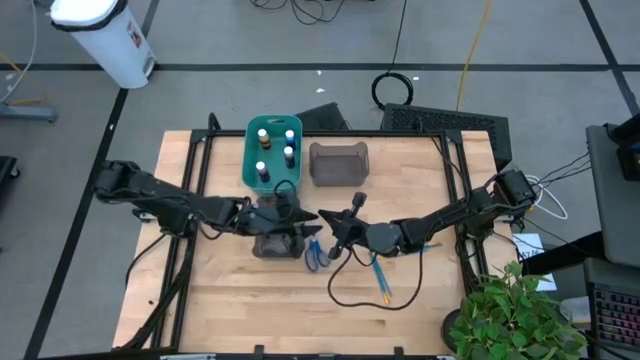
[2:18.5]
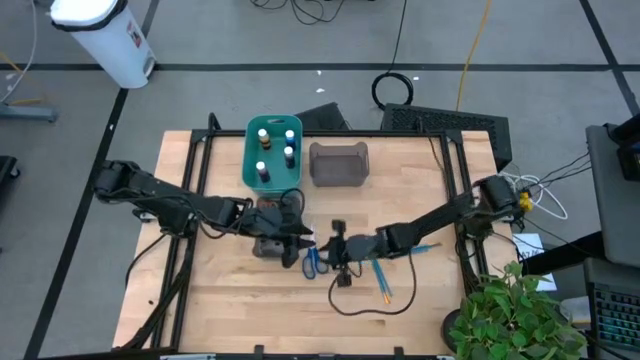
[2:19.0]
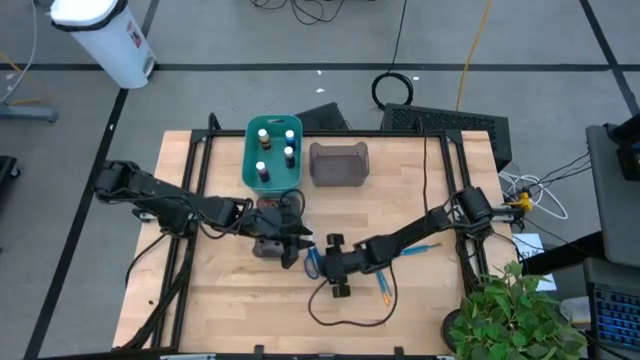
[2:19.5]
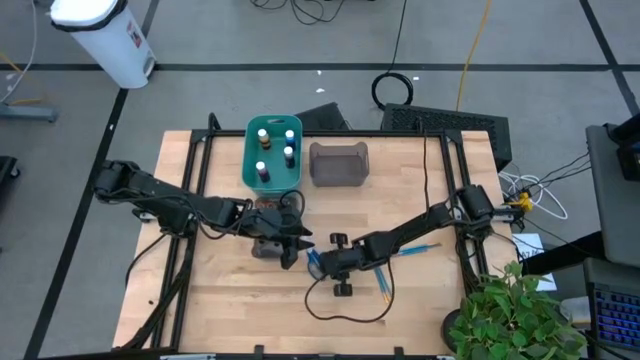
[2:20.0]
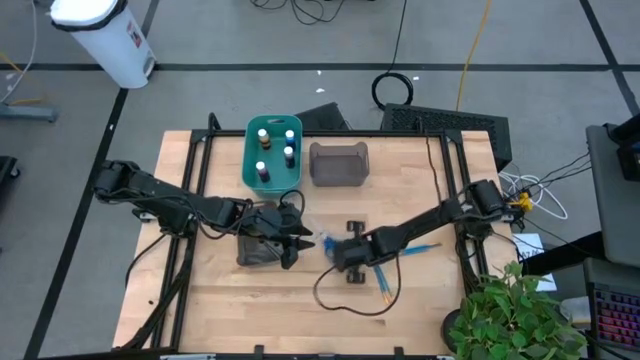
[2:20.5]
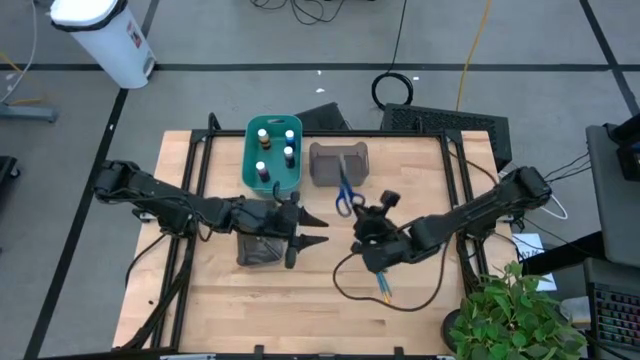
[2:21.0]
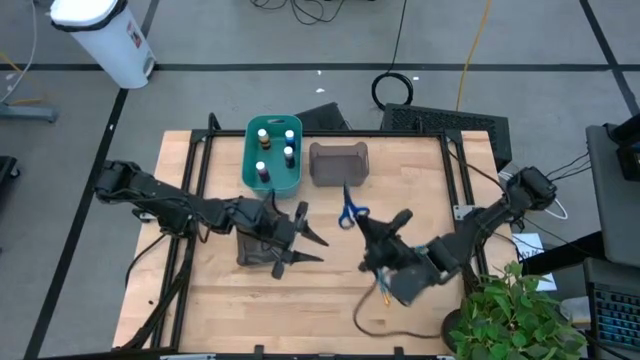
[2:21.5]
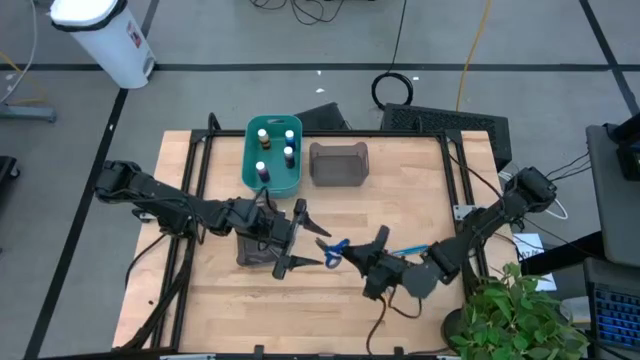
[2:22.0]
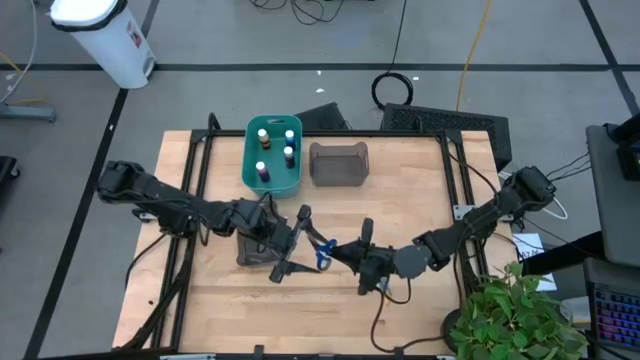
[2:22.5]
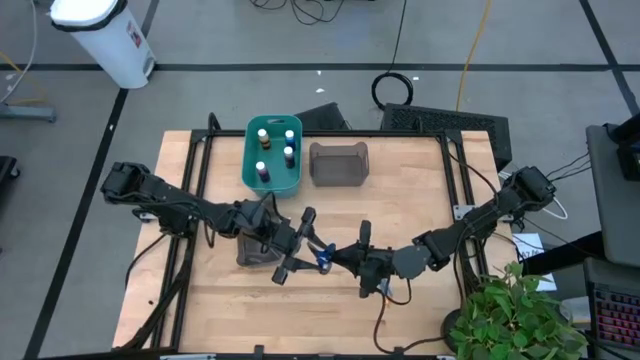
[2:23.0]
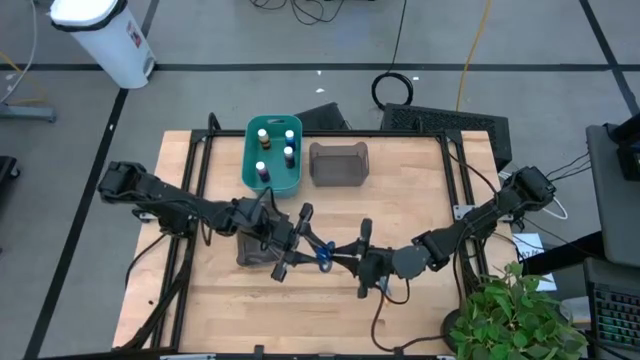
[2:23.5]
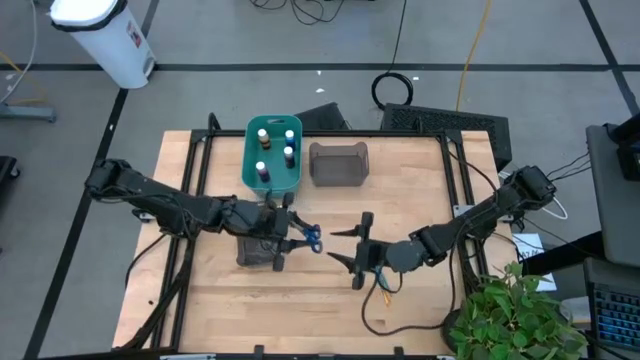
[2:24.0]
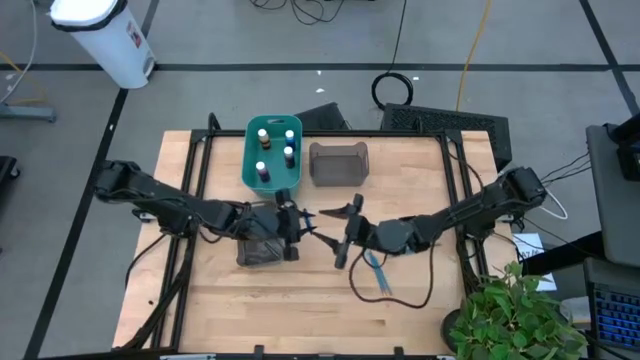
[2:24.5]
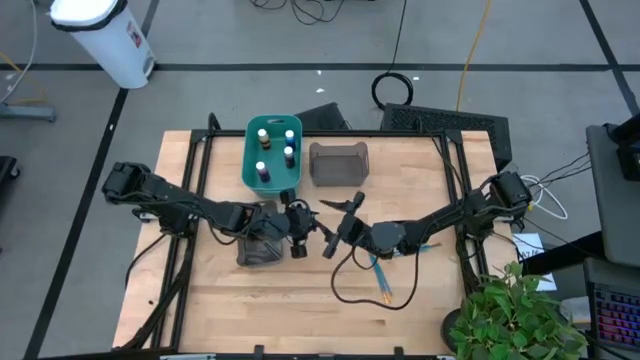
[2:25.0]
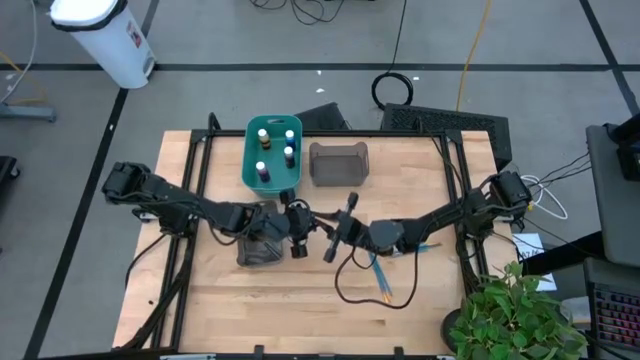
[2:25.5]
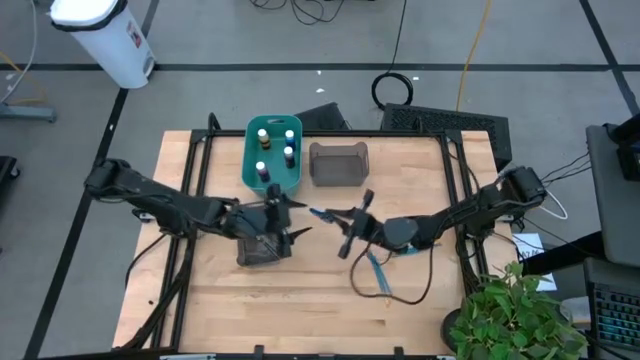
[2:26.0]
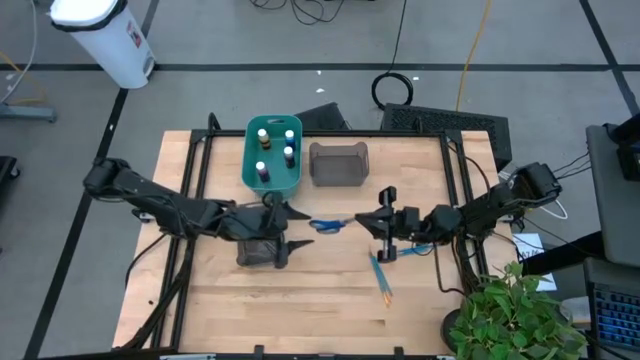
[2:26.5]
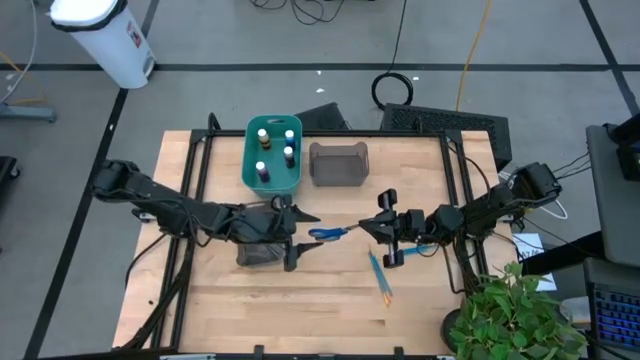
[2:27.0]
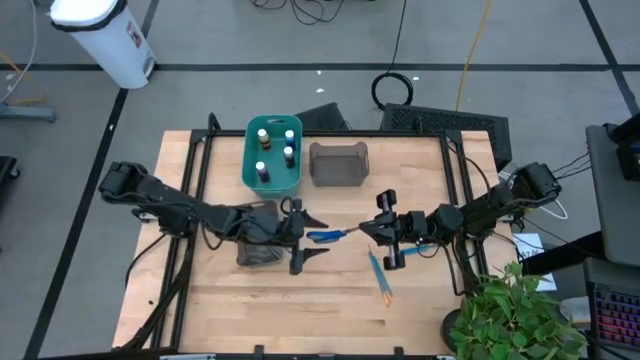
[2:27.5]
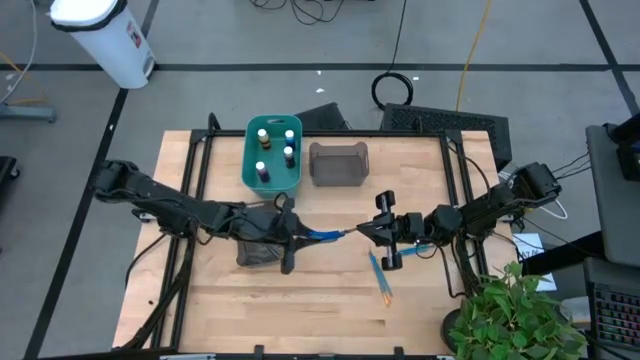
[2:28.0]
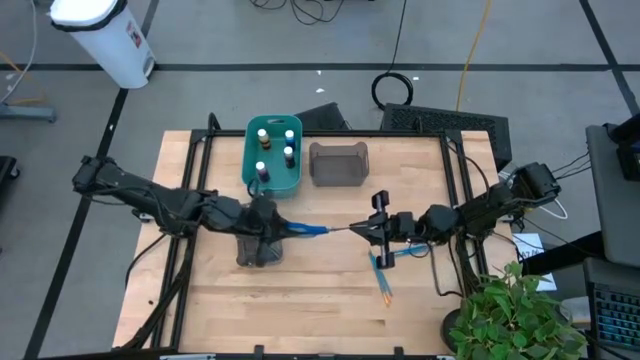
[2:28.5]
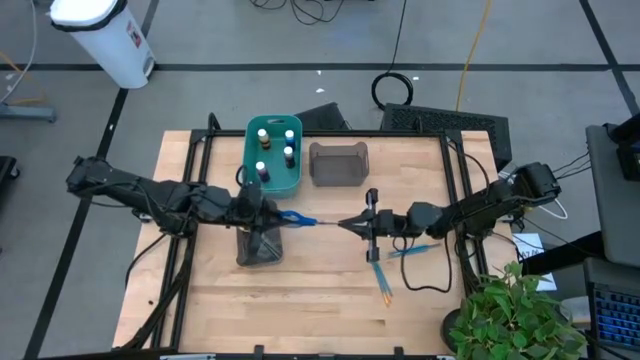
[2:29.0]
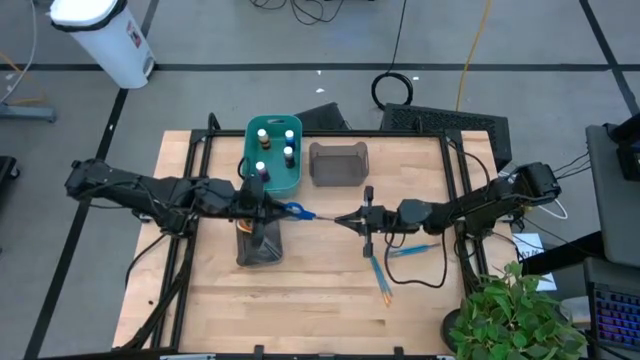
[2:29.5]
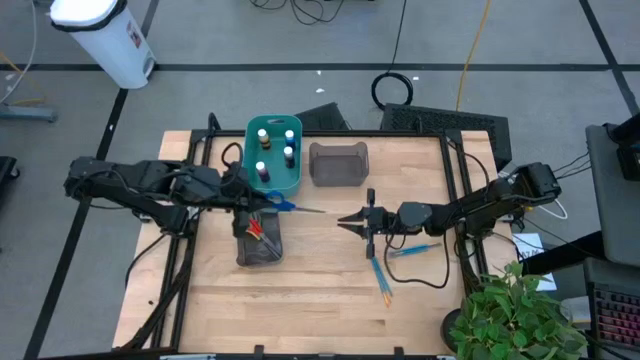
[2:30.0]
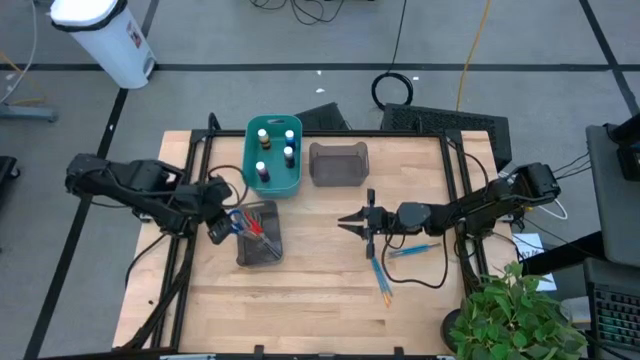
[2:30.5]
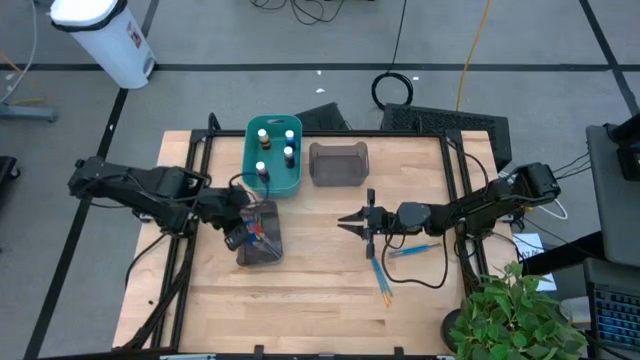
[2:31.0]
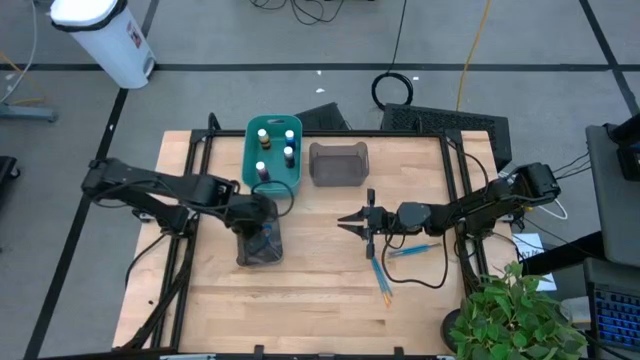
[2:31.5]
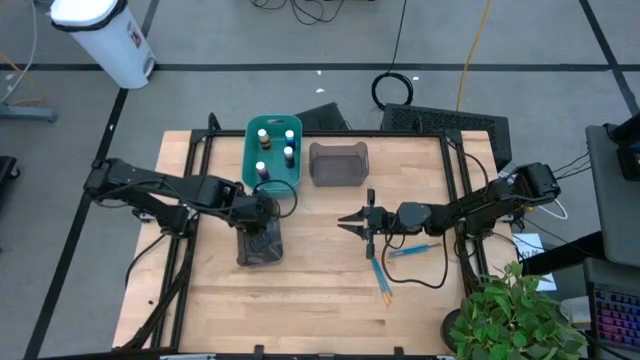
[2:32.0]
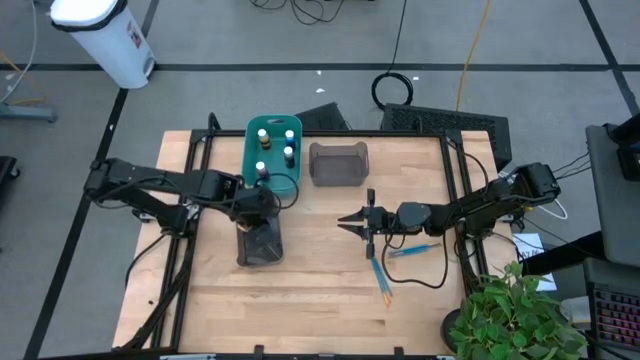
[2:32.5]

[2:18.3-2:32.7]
Task: Pick & Place Paint Supplies
Put the blue scissors into the bottom black bin

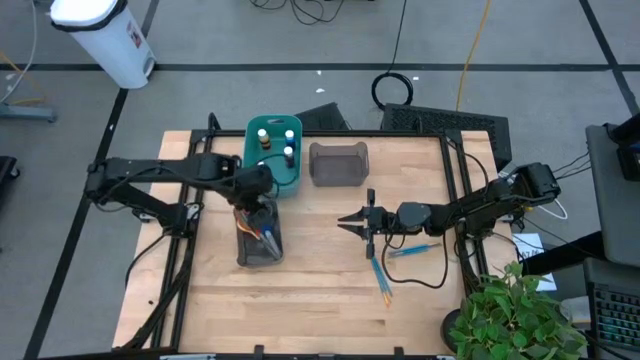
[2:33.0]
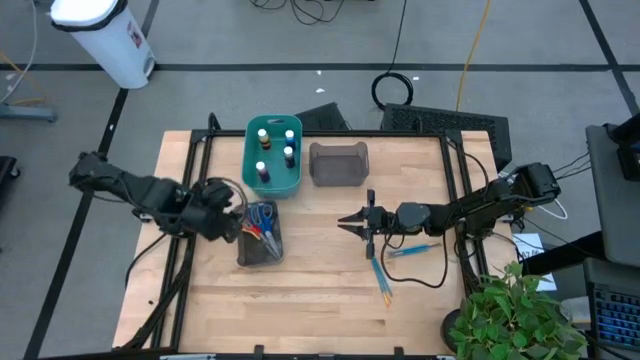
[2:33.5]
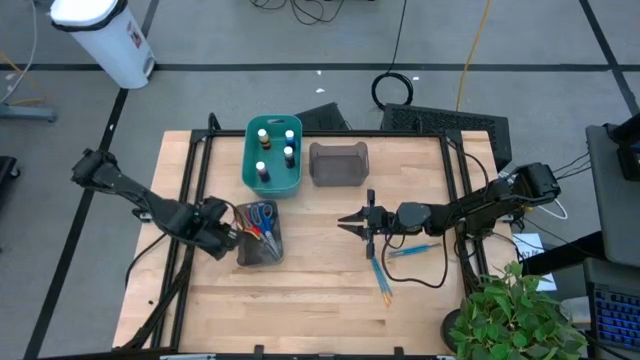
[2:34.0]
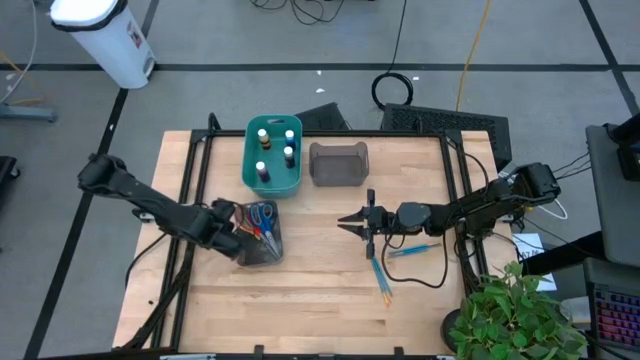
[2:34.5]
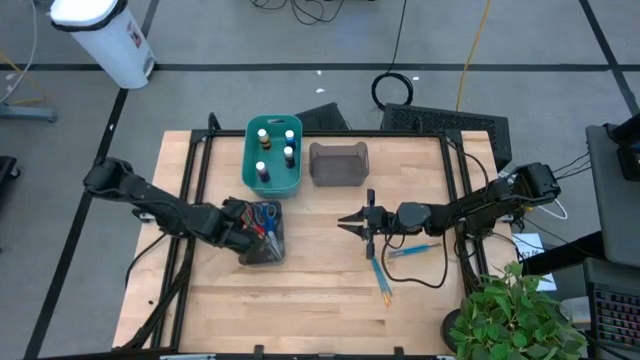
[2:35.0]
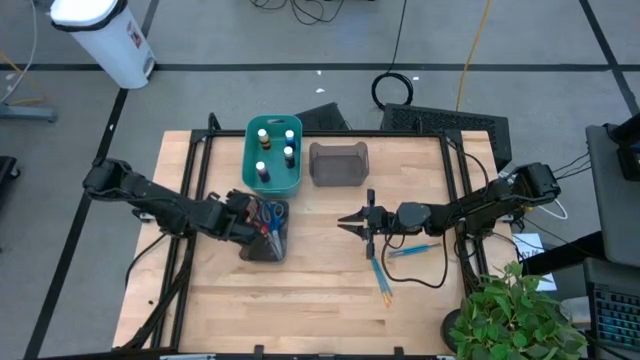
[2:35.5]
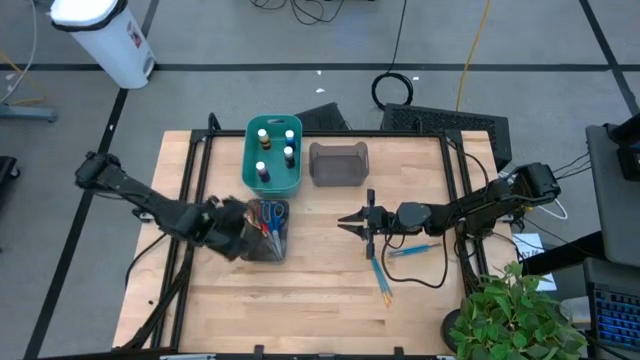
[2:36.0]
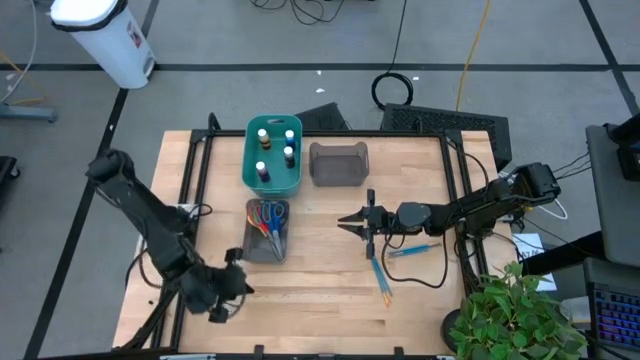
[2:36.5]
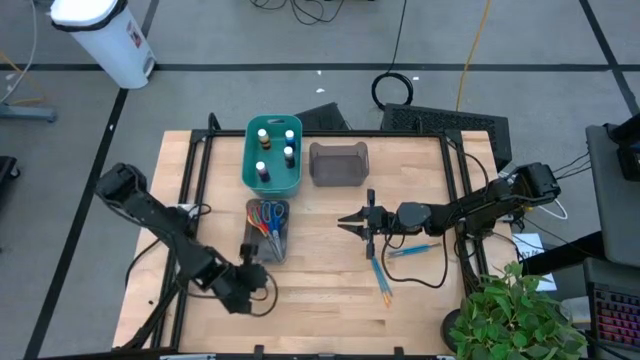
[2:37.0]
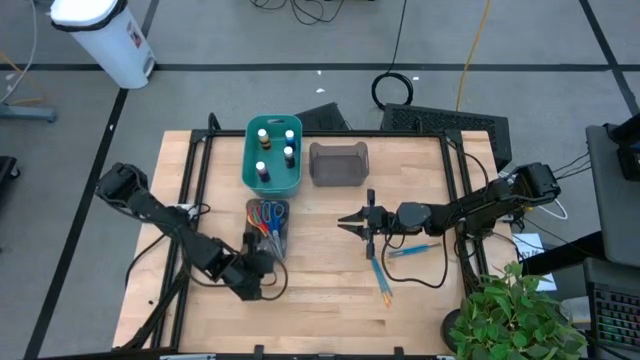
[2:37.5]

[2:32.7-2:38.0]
Adjust the bottom black bin

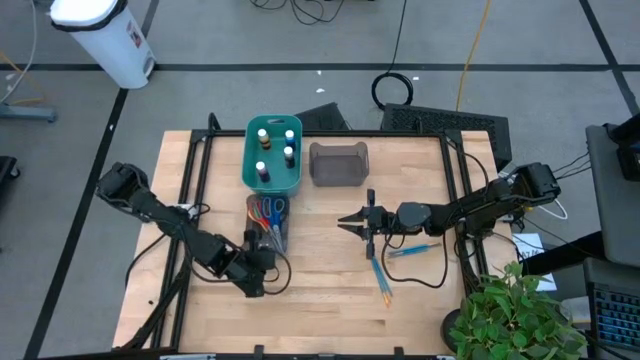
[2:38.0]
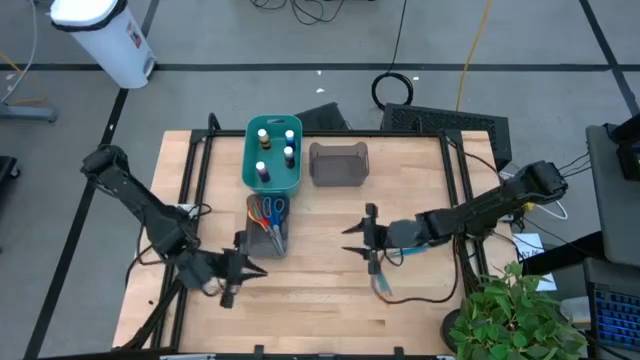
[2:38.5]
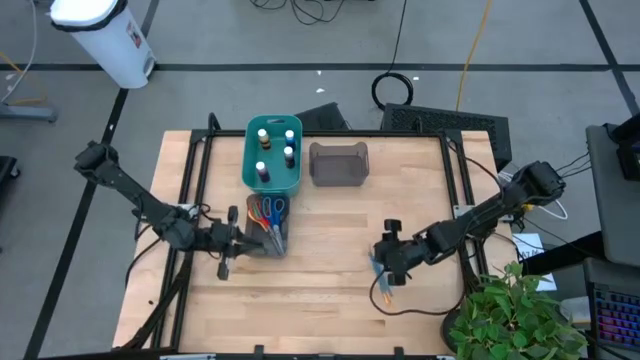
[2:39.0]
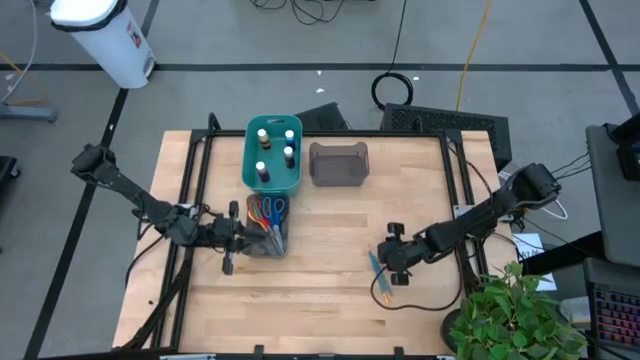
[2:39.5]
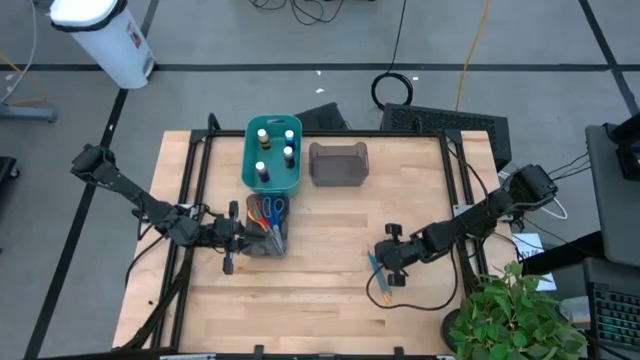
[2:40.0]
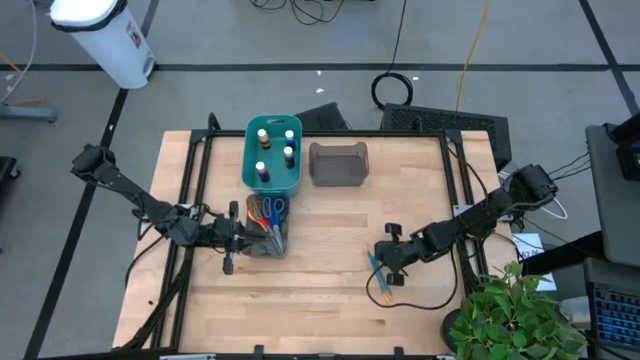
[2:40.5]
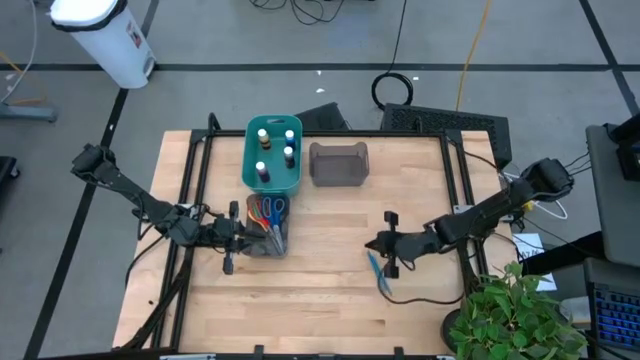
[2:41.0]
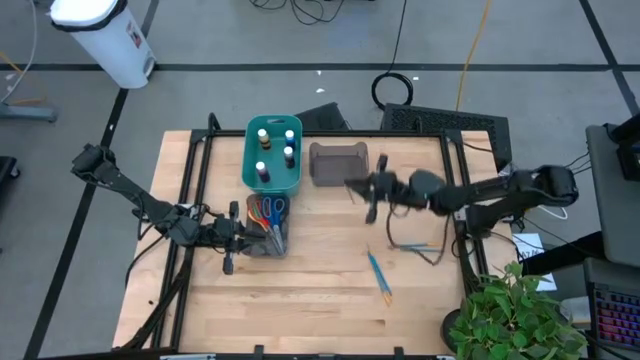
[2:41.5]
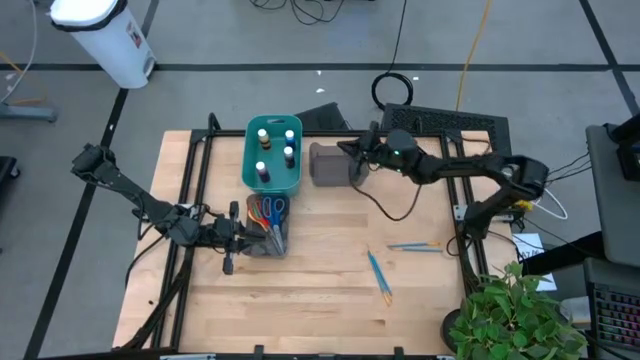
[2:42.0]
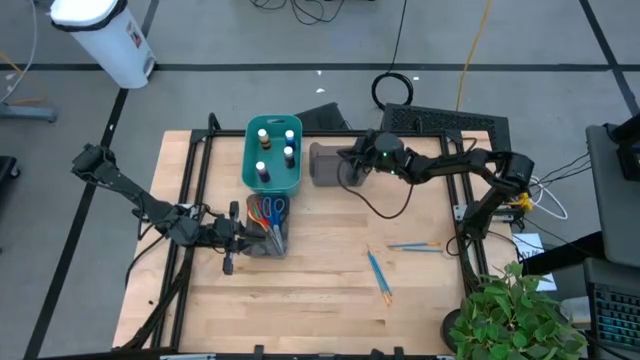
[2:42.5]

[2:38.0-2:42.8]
Put the blue paintbrush into the top black bin
